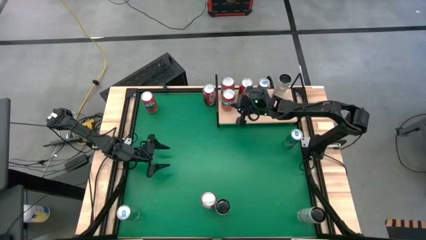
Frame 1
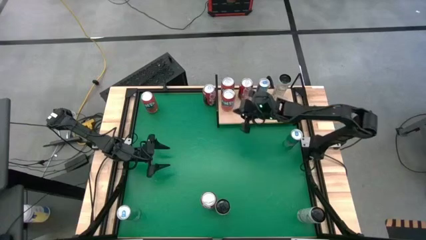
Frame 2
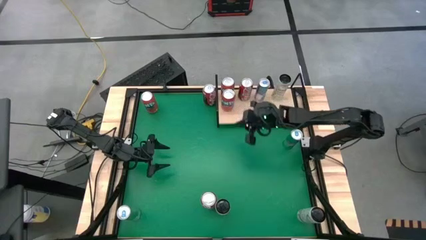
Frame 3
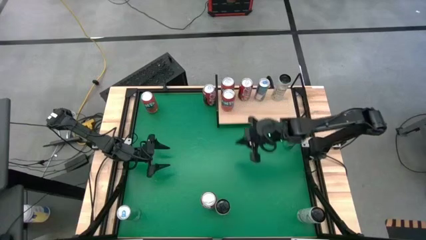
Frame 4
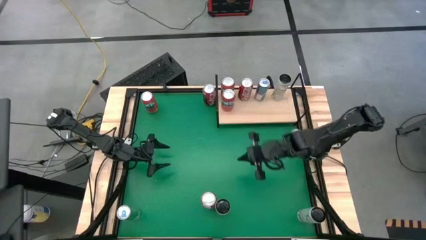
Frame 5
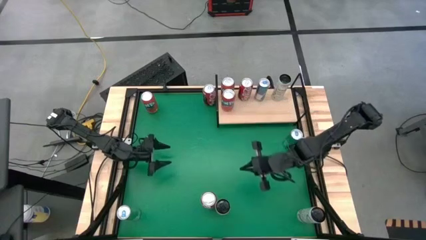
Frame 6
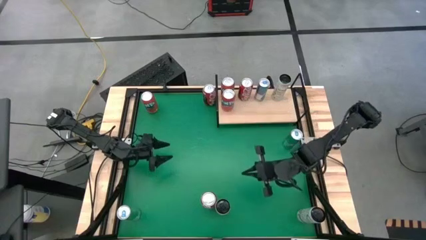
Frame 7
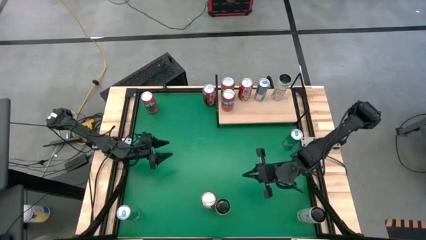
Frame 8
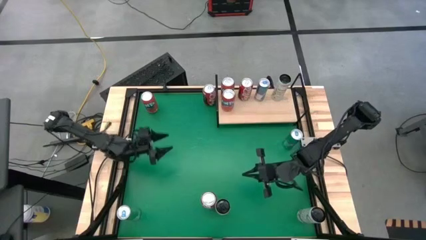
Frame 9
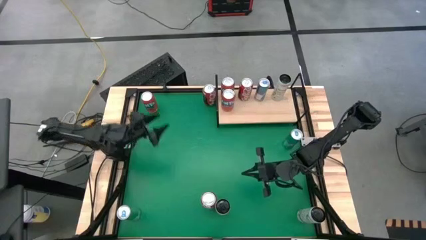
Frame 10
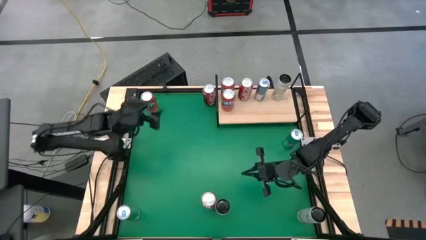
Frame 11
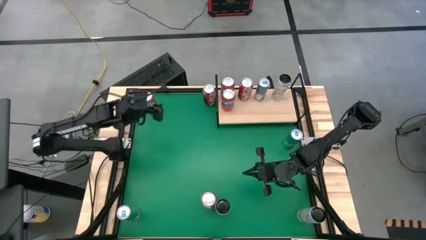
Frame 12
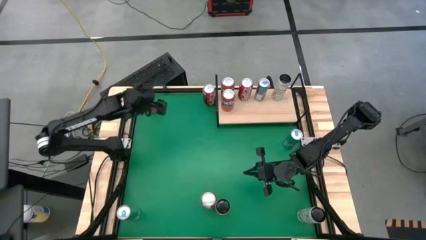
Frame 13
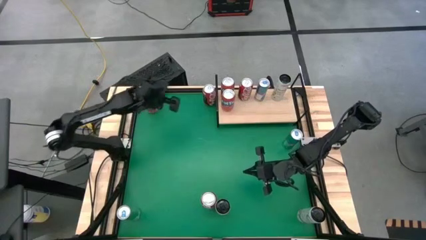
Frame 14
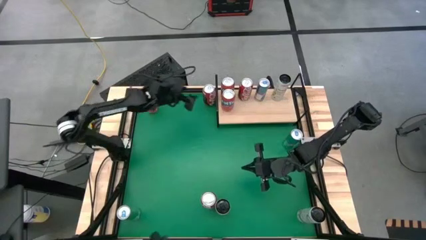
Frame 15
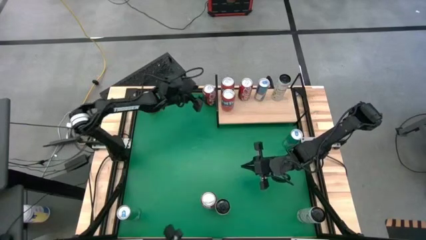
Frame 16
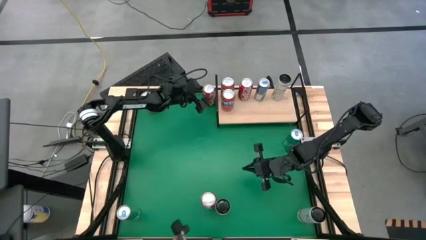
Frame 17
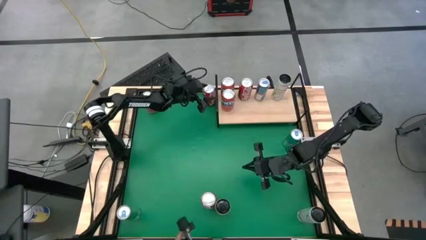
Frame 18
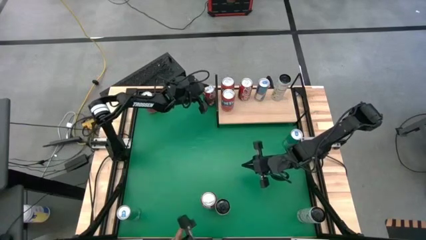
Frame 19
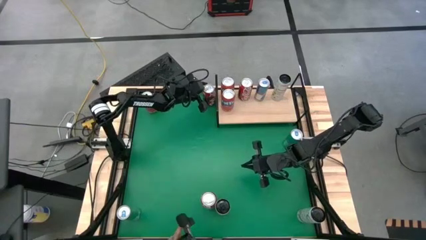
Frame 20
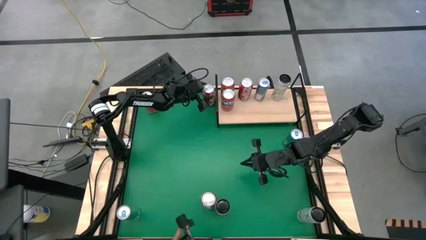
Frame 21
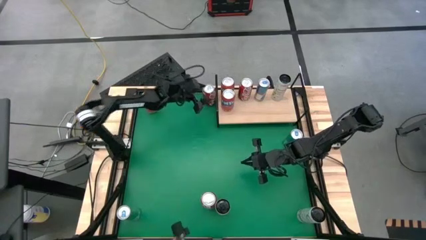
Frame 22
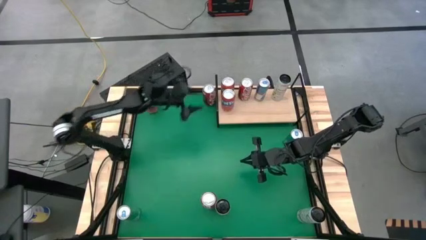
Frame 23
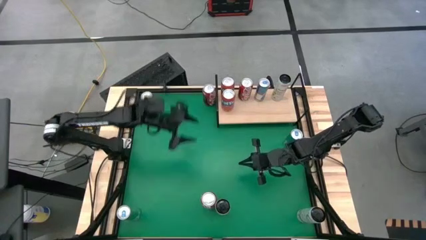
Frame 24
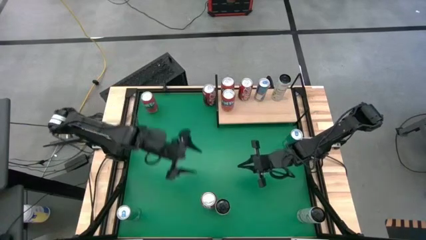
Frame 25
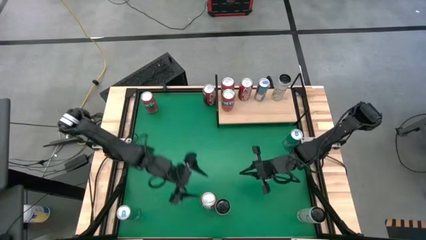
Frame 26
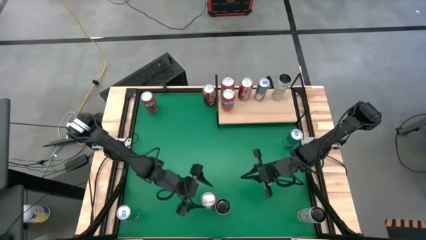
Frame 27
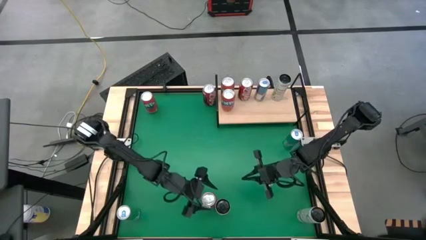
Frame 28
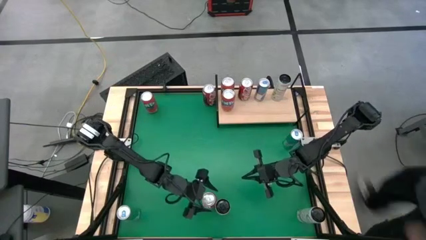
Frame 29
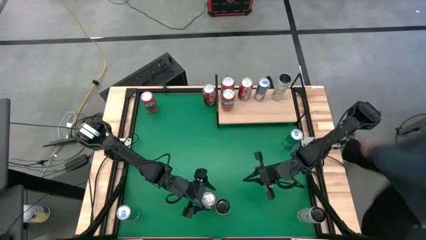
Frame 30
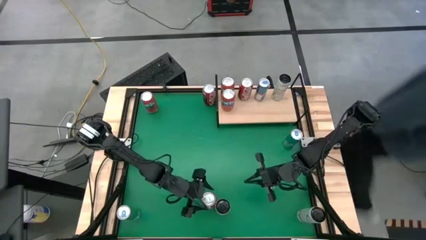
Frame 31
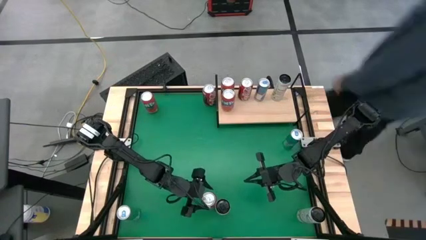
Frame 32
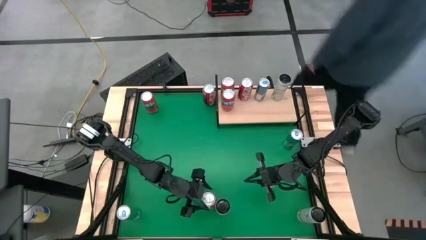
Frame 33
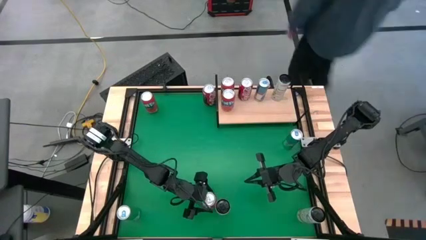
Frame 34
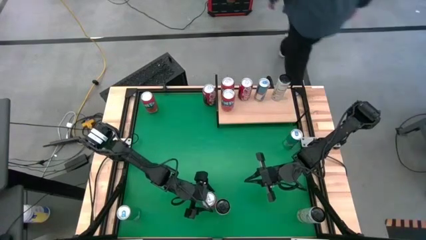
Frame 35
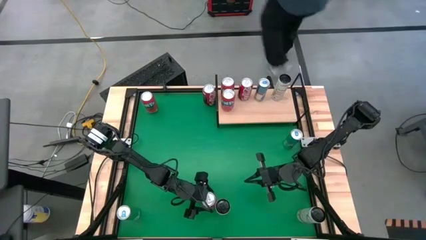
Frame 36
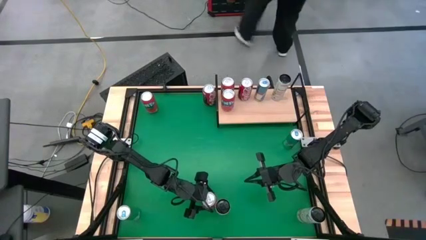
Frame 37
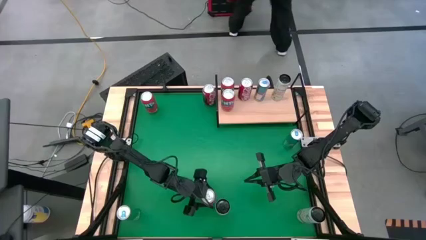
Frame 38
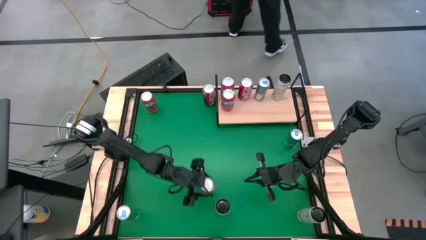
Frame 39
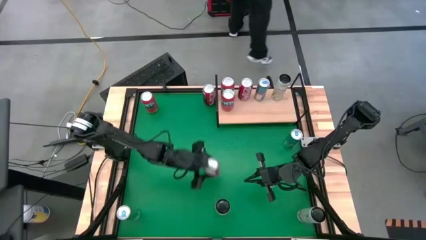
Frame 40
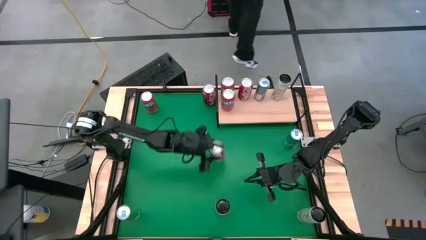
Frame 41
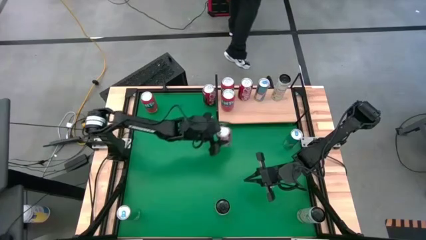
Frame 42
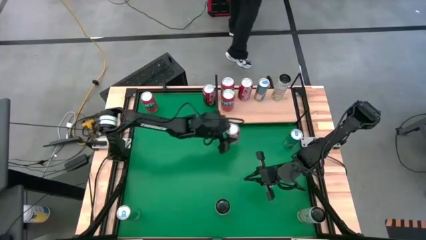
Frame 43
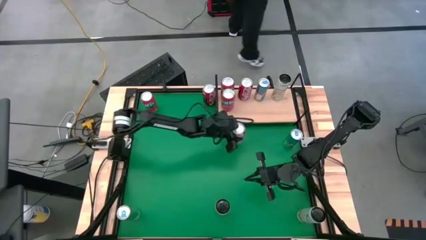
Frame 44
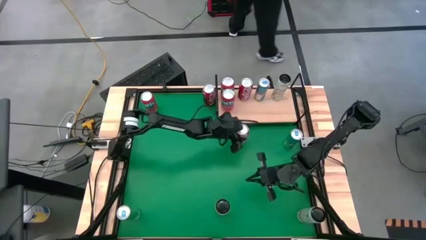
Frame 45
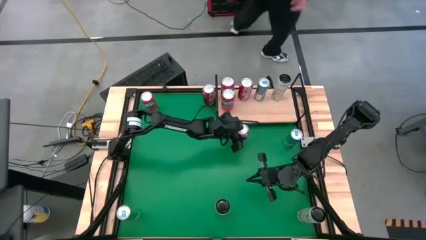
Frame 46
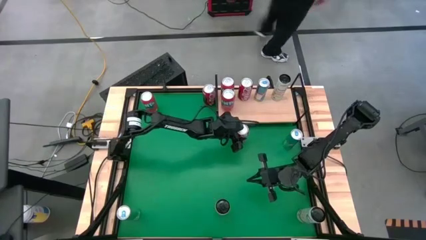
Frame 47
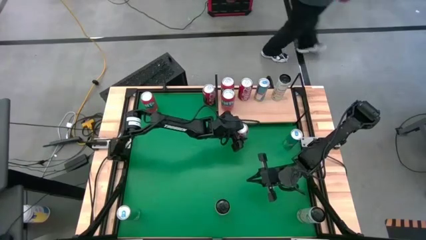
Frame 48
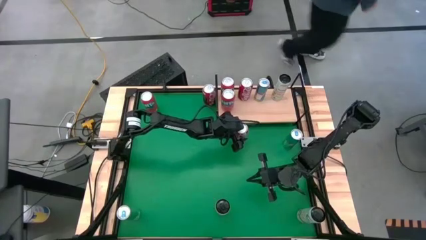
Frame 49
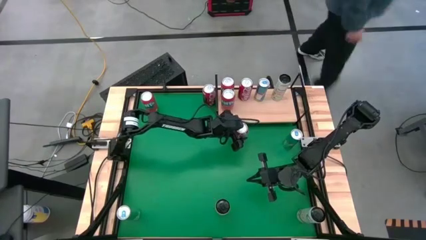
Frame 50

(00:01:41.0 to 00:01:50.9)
Task: Place canned beverage on shelf
Move the bottom red white soda can near the shelf
